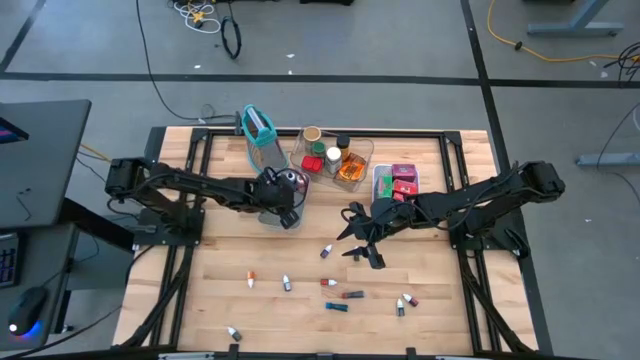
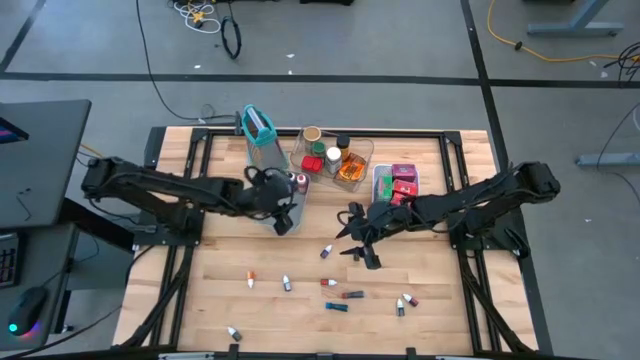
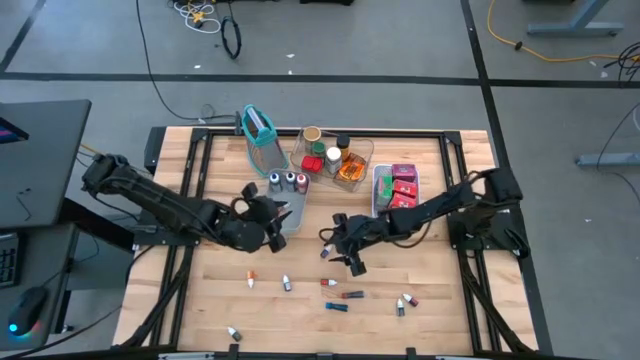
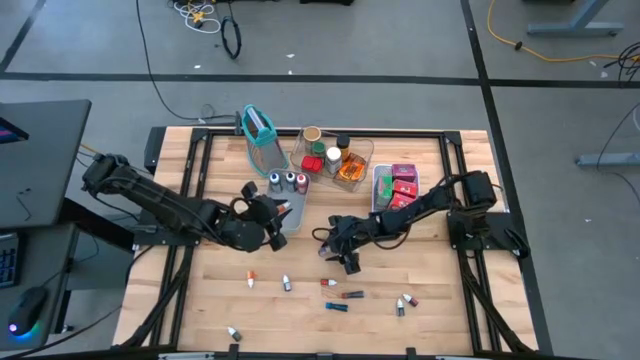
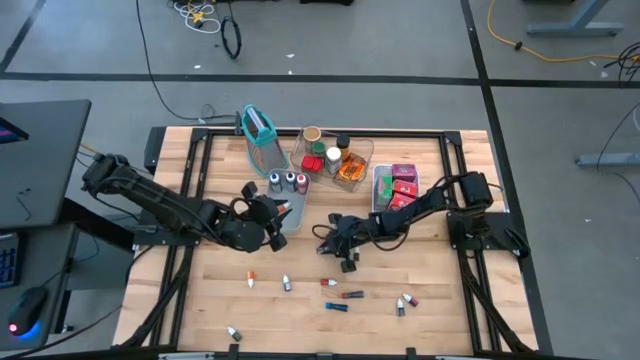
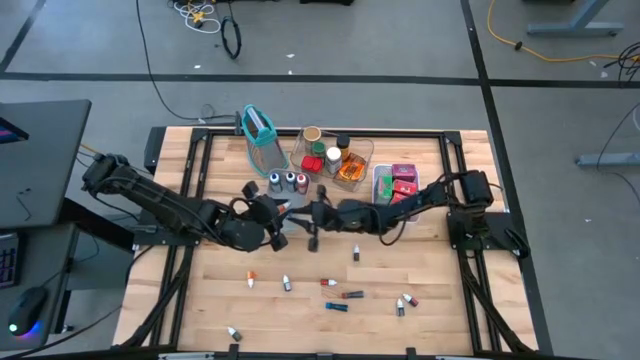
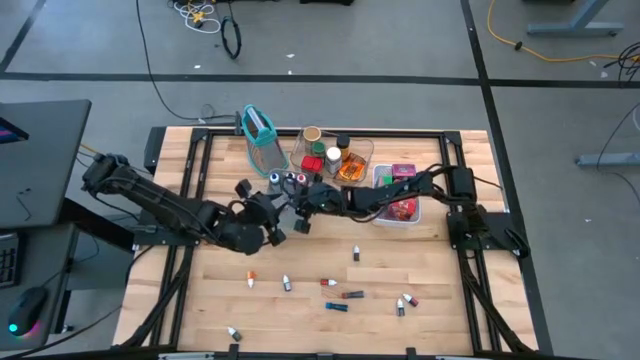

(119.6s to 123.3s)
Task: Pick & Place Kitchen Items
Put the small violet food coloring bottle into the gray bin

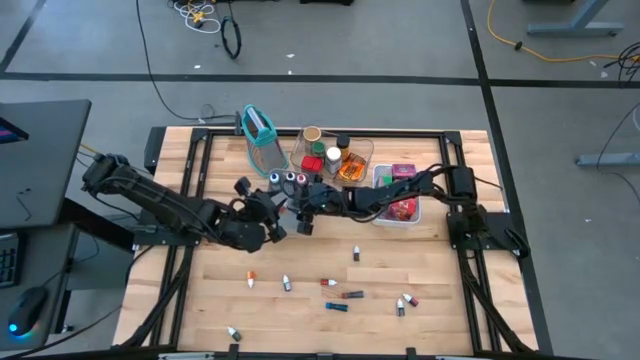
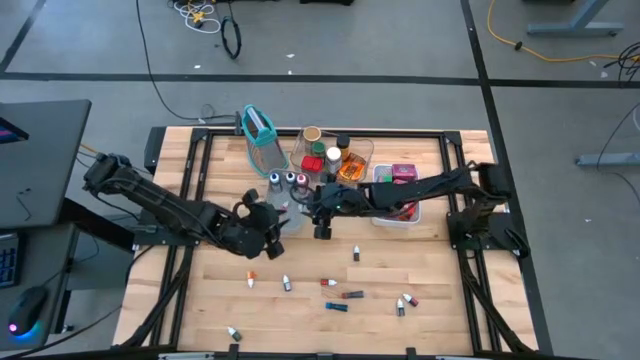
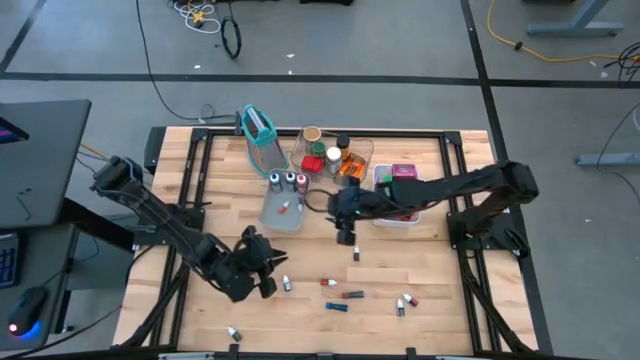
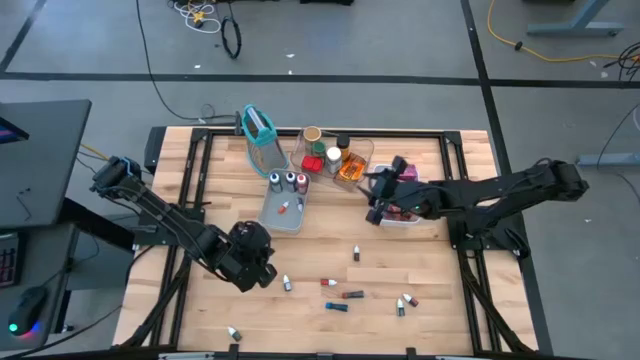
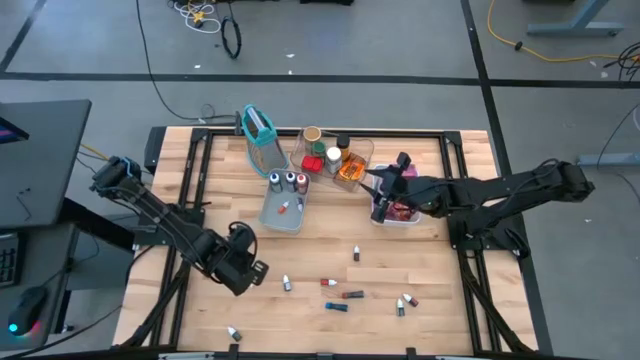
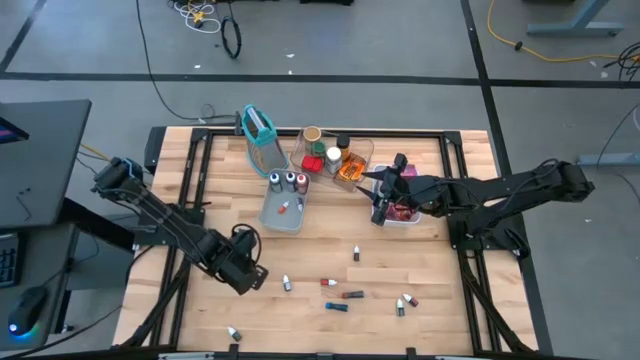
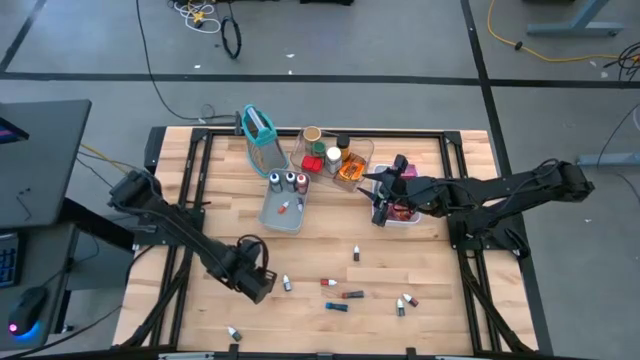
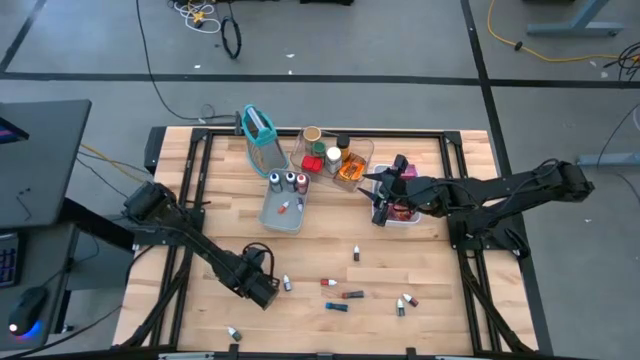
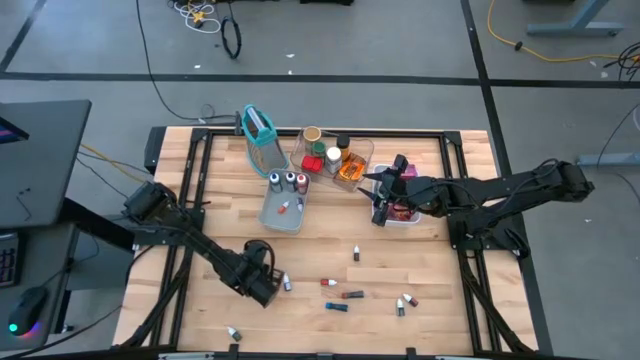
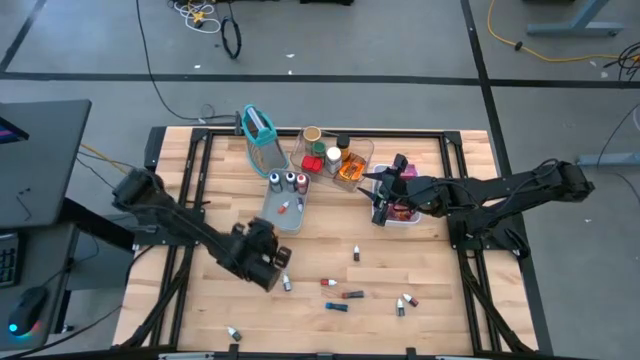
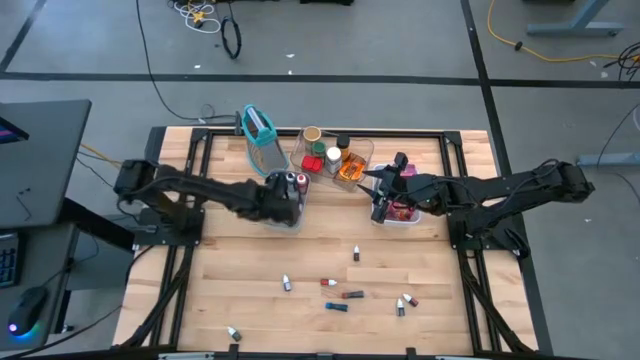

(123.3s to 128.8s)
Put the small orange food coloring bottle into the gray bin

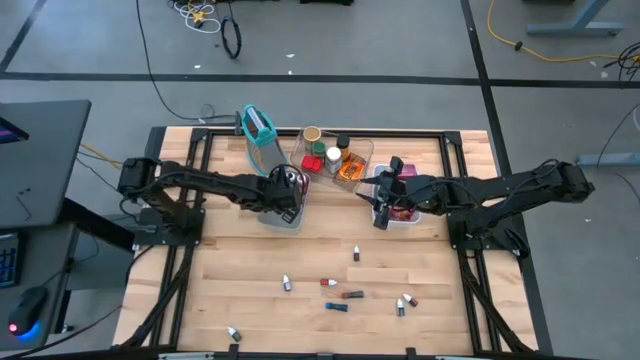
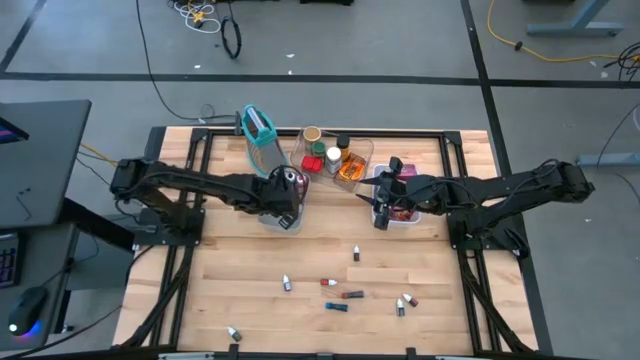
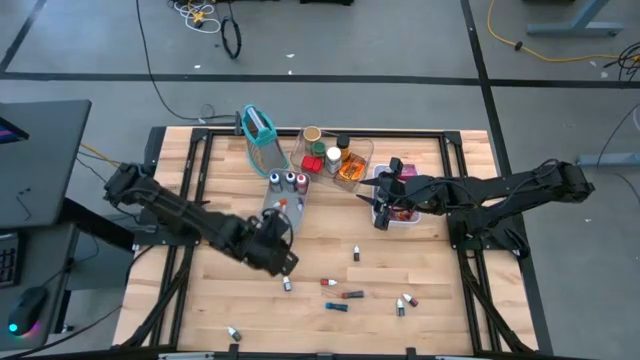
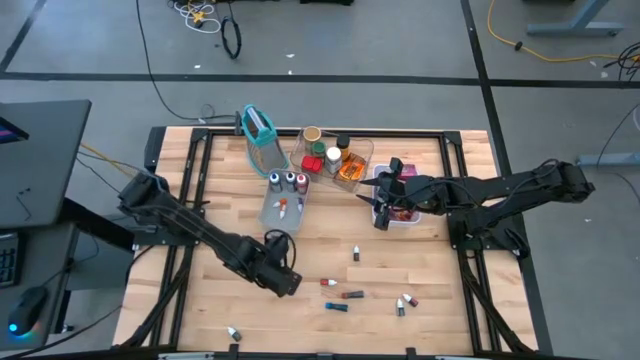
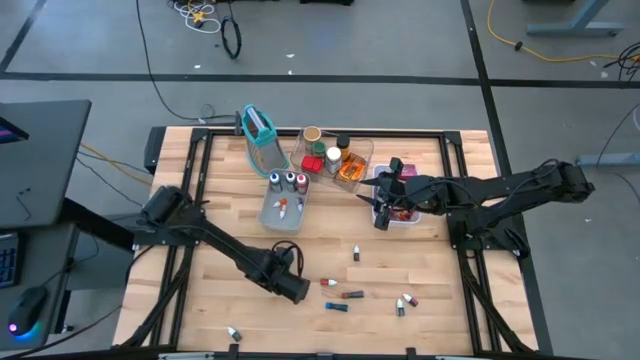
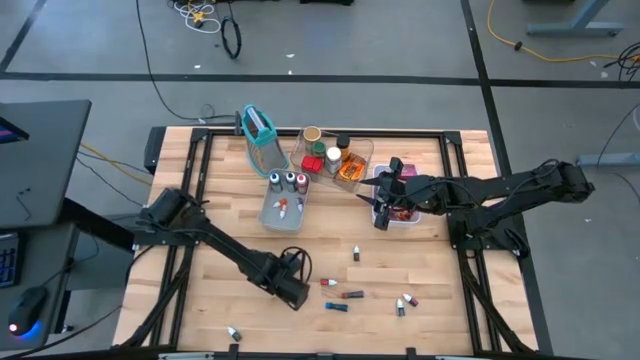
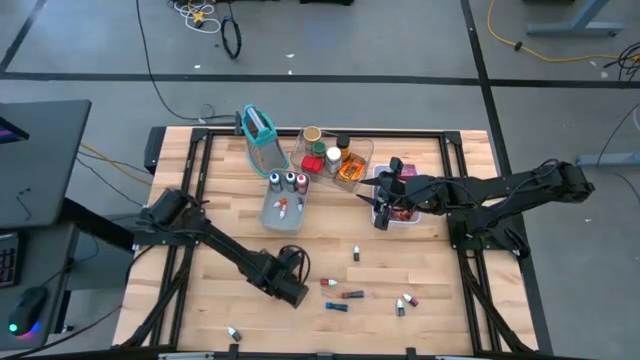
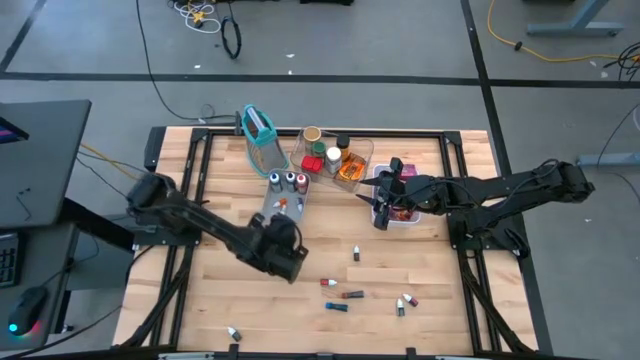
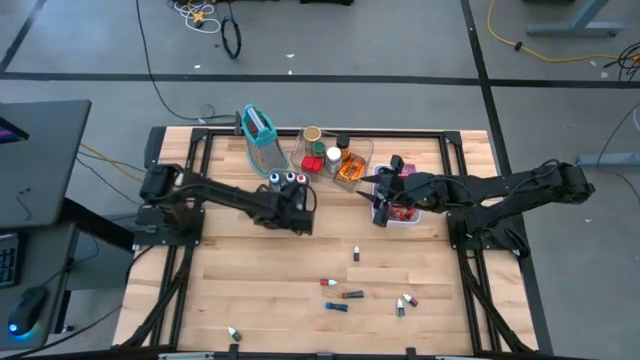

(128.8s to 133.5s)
Put the small violet food coloring bottle into the gray bin

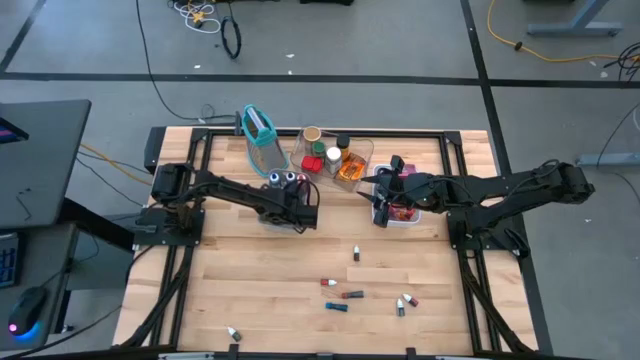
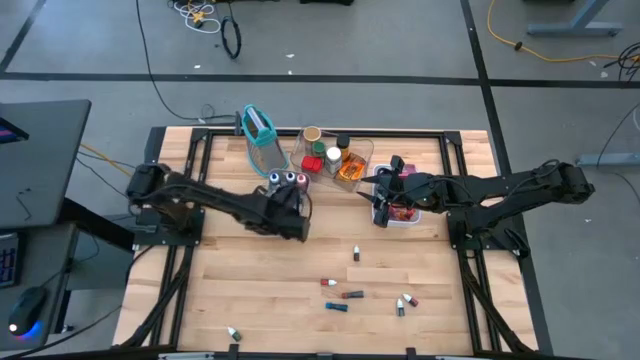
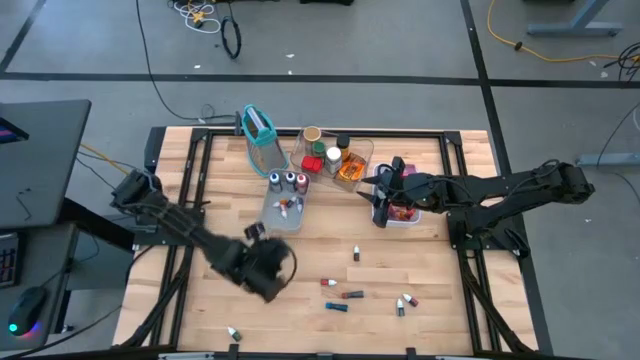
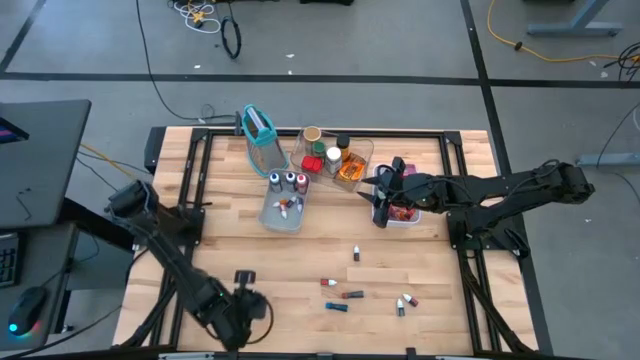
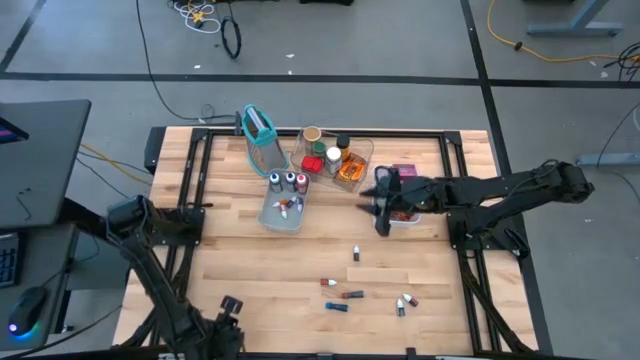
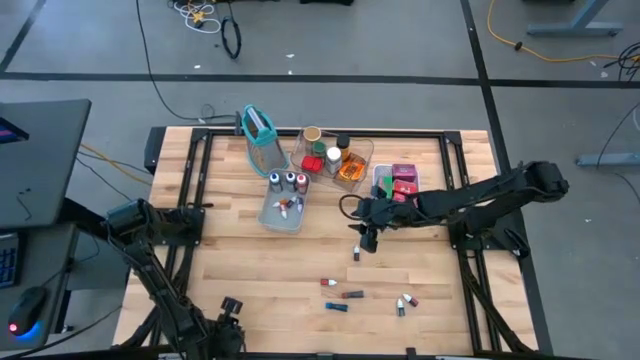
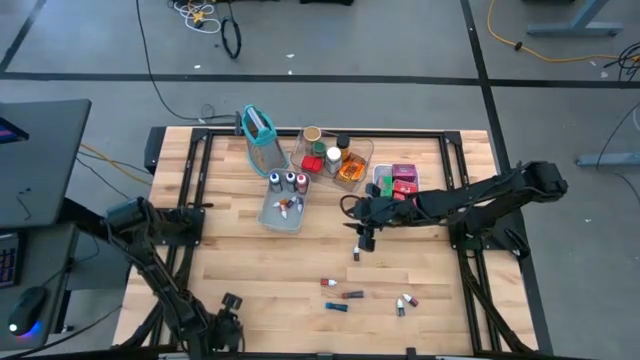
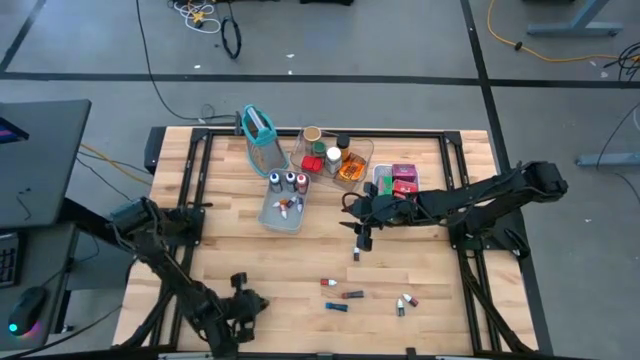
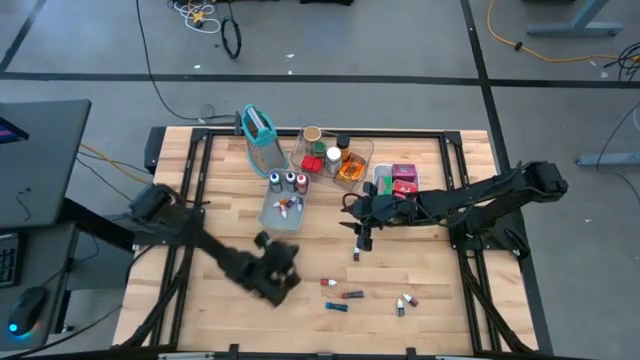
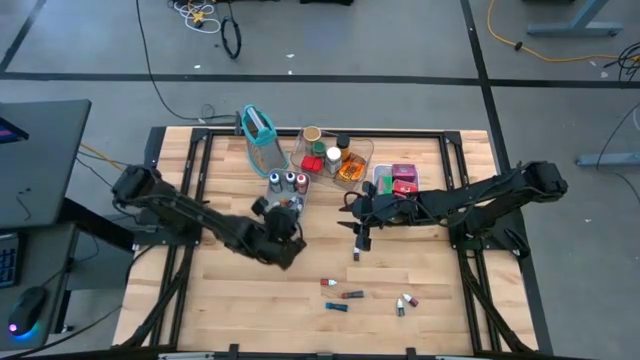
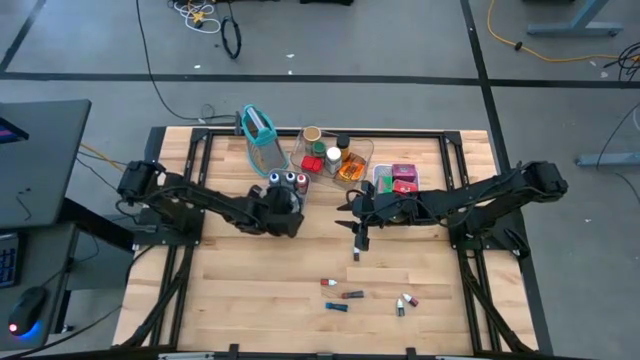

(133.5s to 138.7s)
Put the small green food coloring bottle into the gray bin

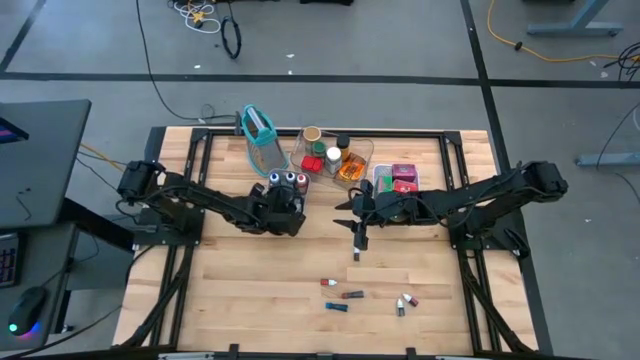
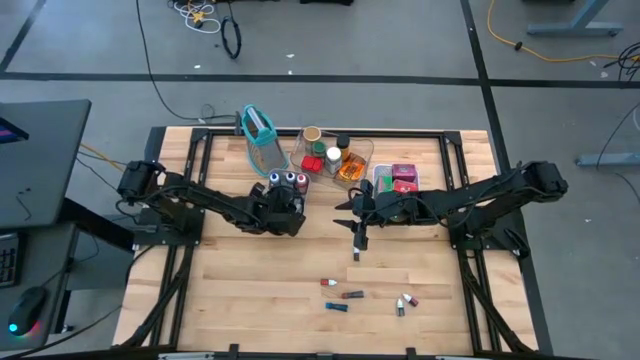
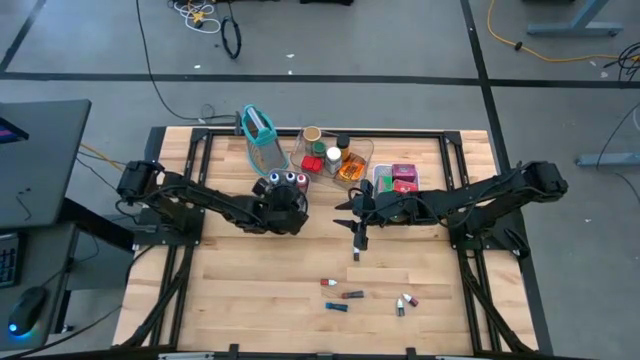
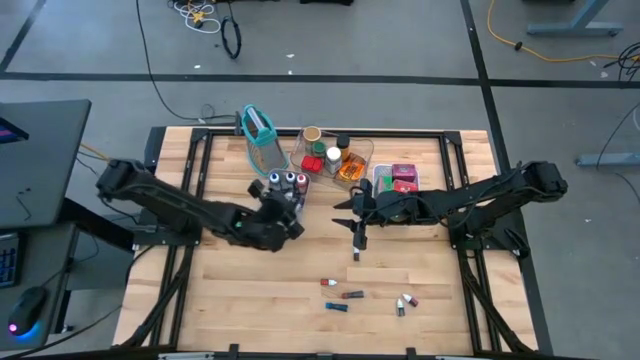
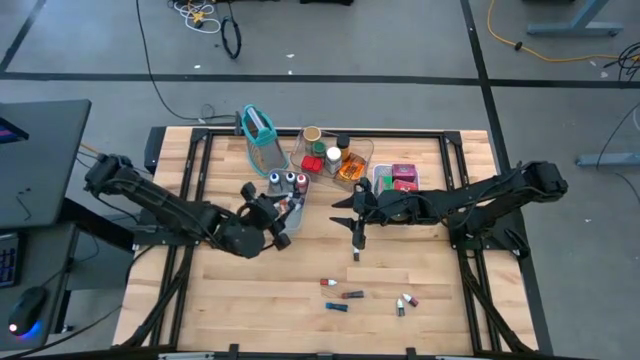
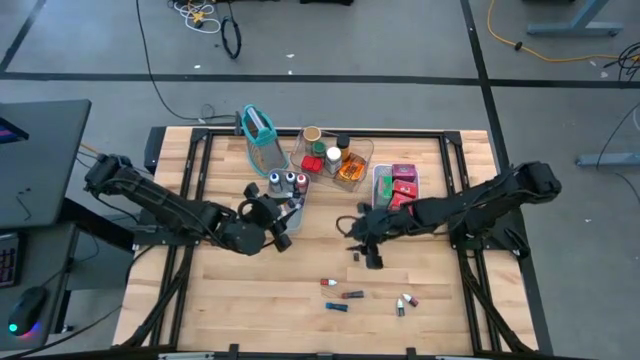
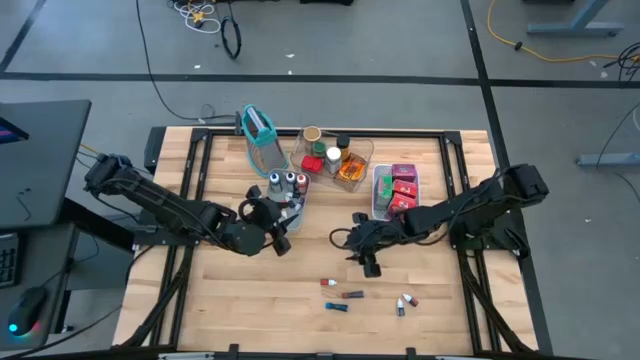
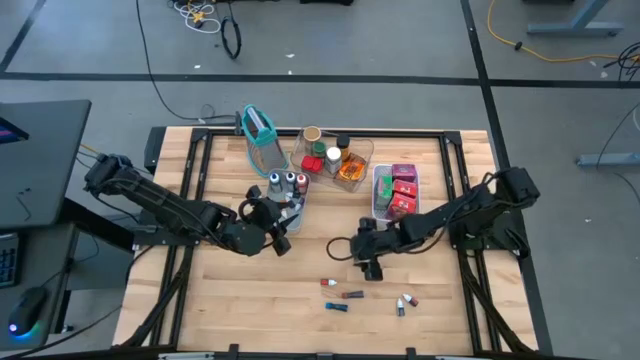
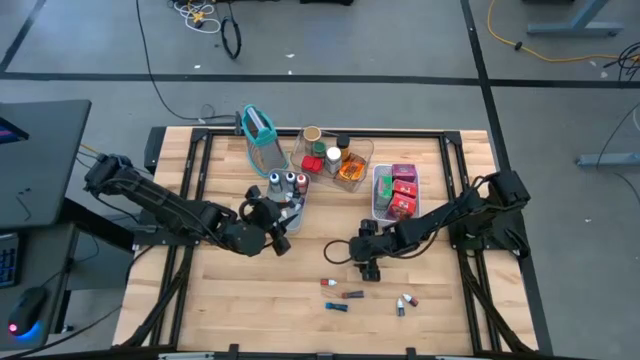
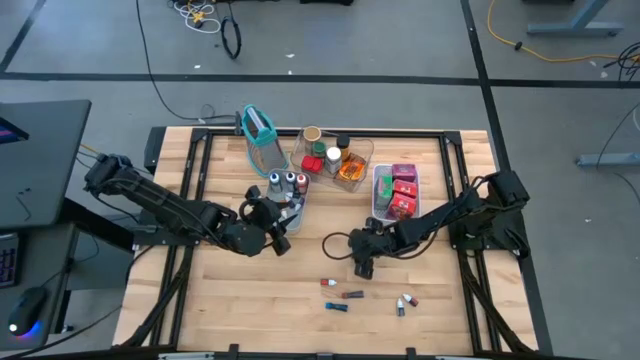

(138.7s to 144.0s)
Put the small brown food coloring bottle into the gray bin
